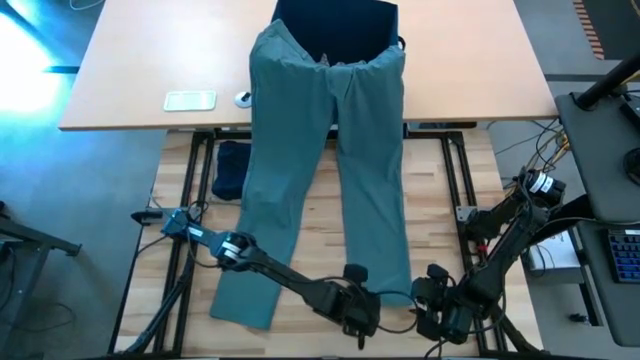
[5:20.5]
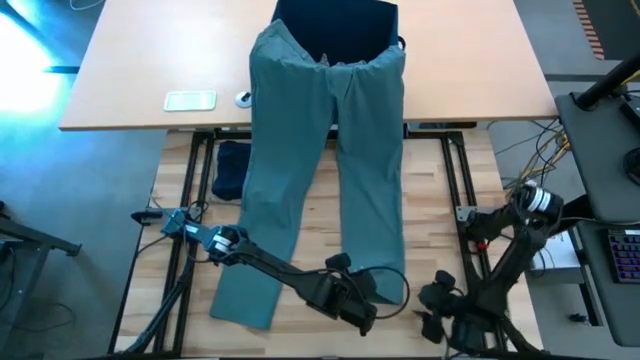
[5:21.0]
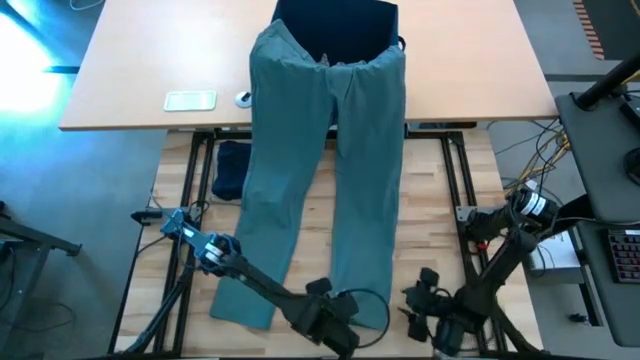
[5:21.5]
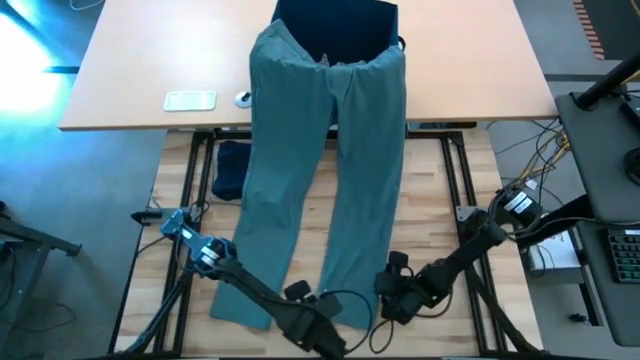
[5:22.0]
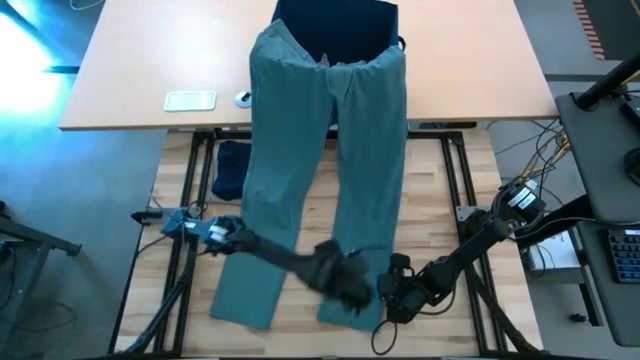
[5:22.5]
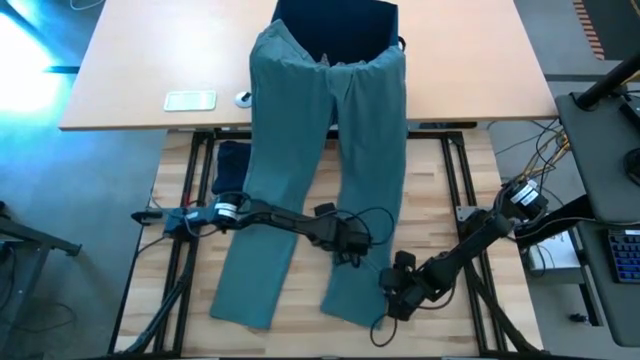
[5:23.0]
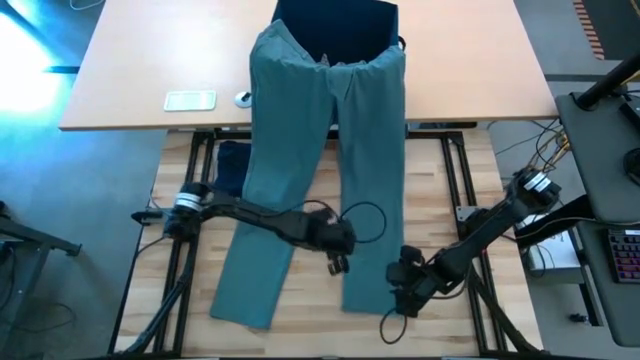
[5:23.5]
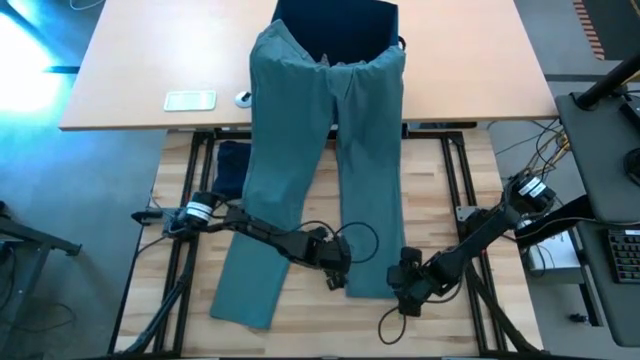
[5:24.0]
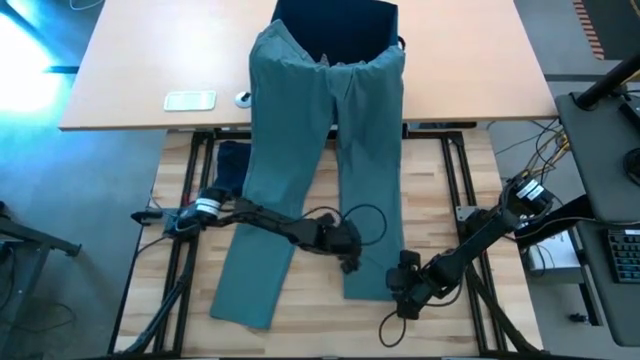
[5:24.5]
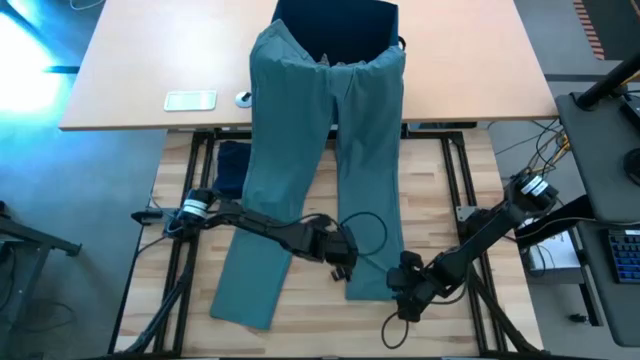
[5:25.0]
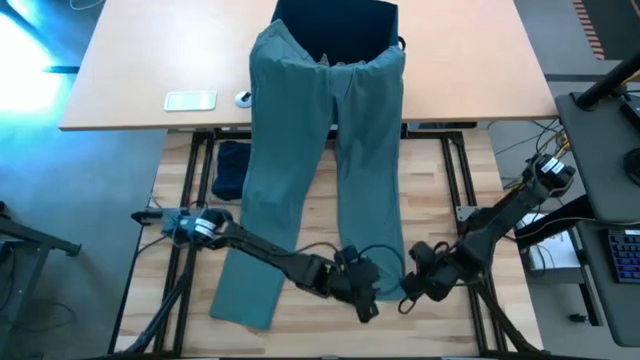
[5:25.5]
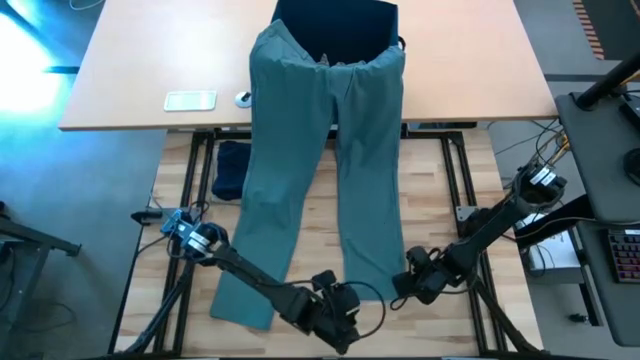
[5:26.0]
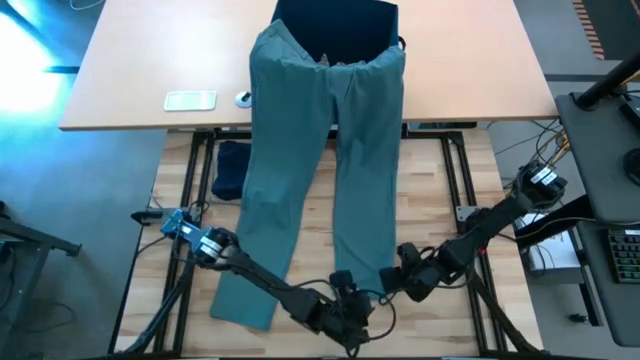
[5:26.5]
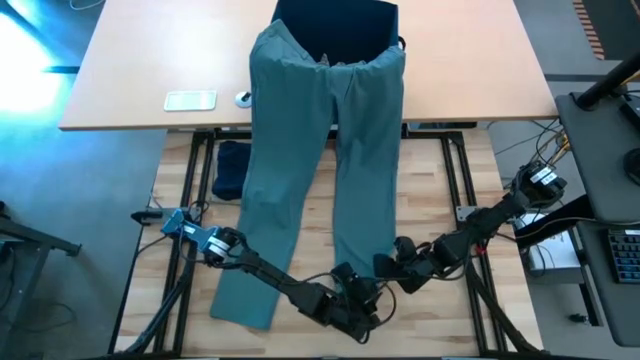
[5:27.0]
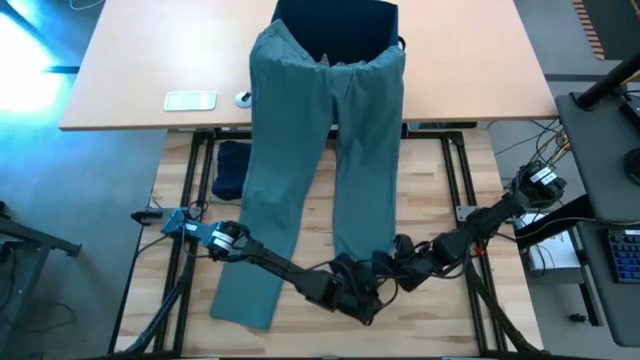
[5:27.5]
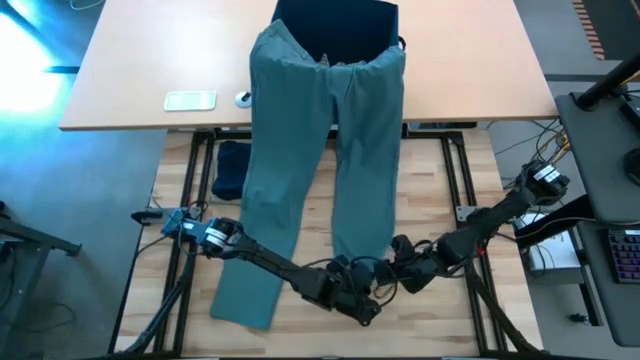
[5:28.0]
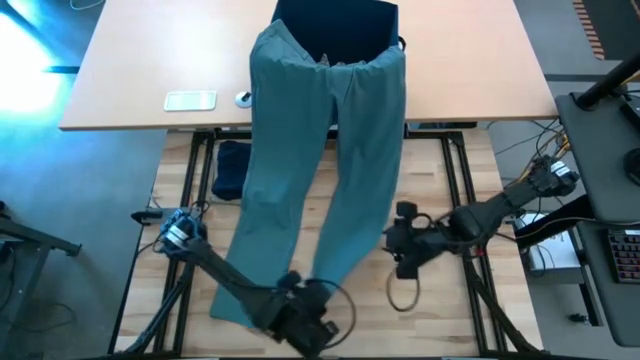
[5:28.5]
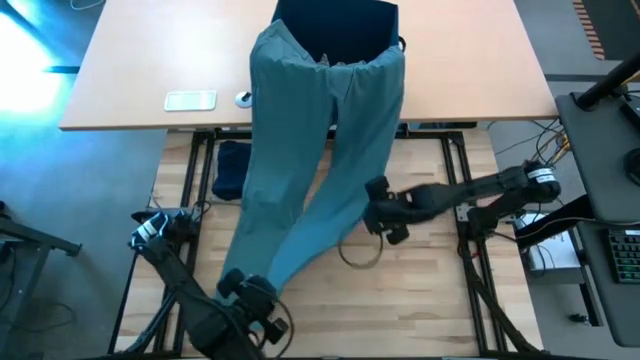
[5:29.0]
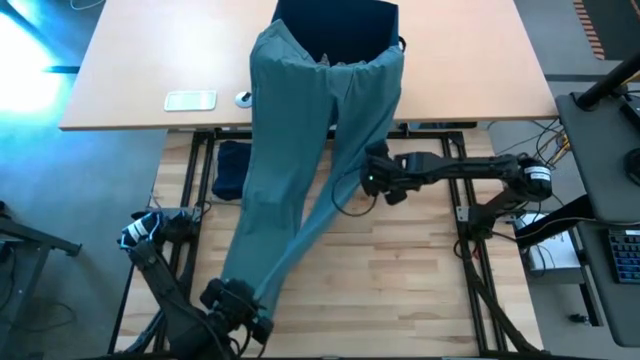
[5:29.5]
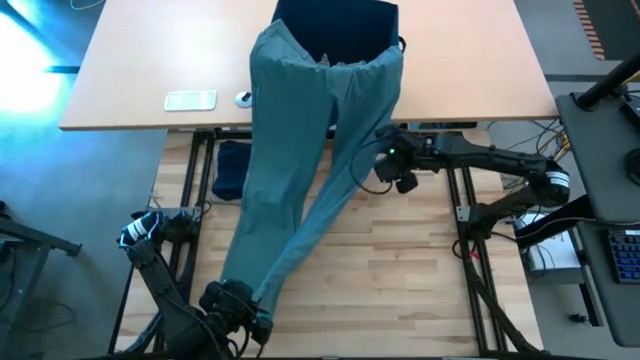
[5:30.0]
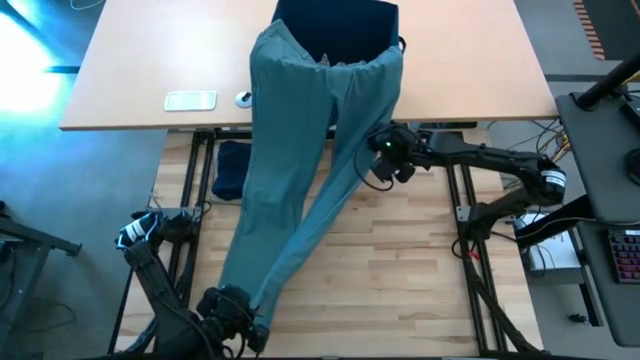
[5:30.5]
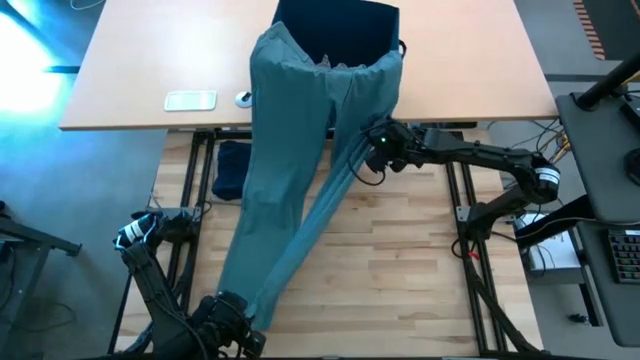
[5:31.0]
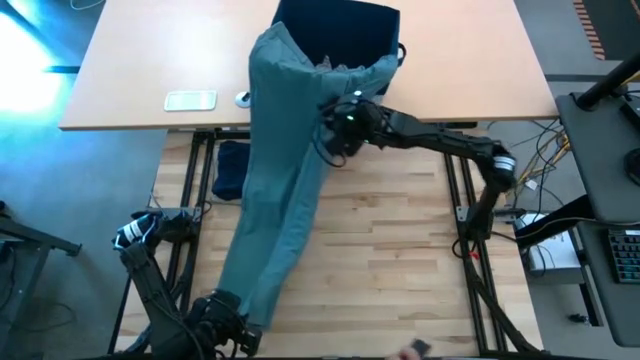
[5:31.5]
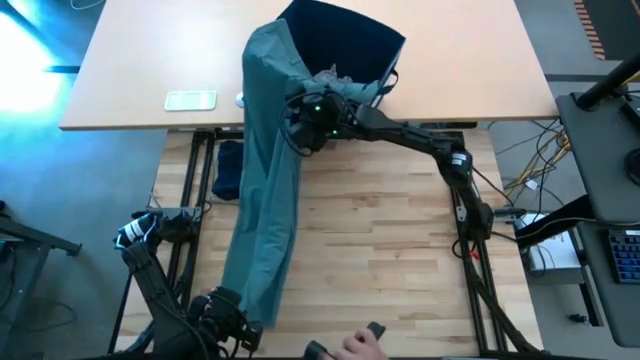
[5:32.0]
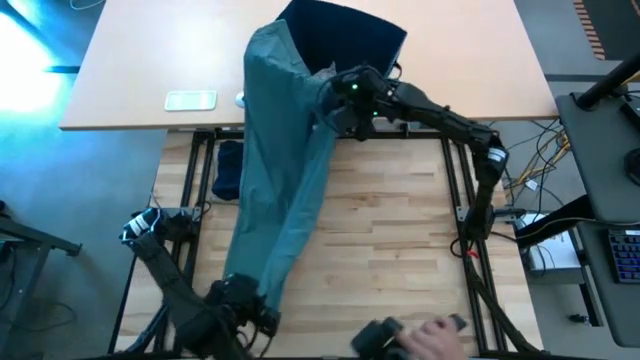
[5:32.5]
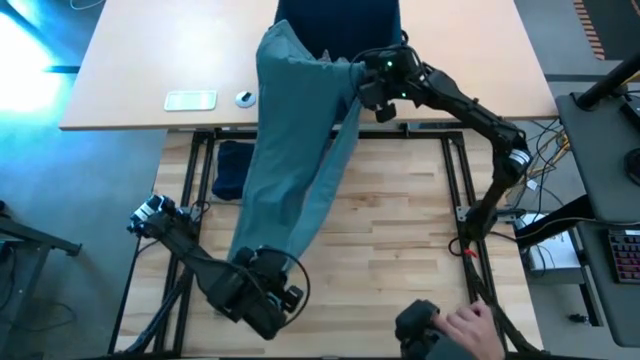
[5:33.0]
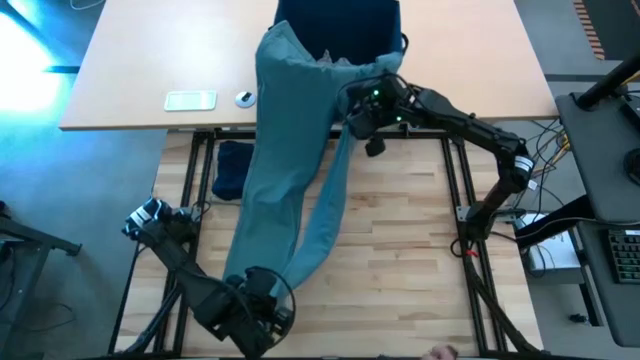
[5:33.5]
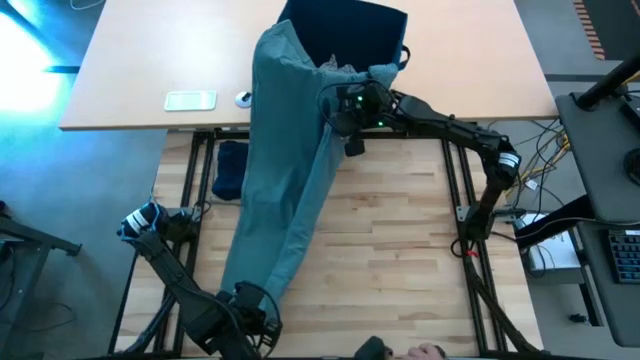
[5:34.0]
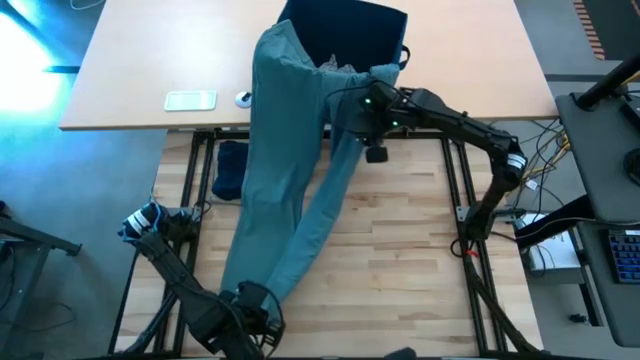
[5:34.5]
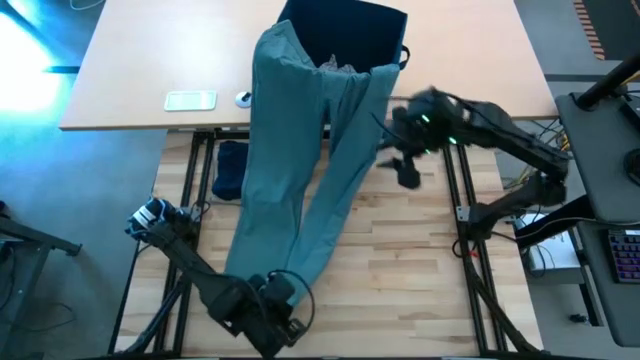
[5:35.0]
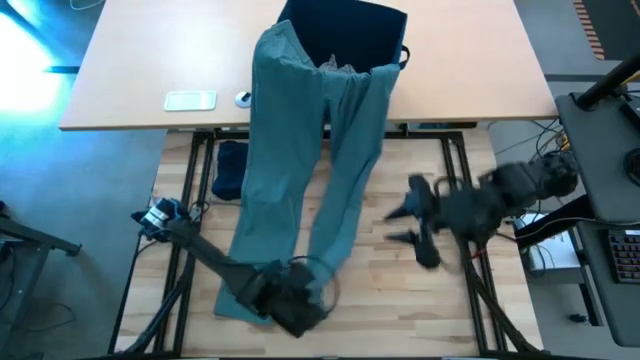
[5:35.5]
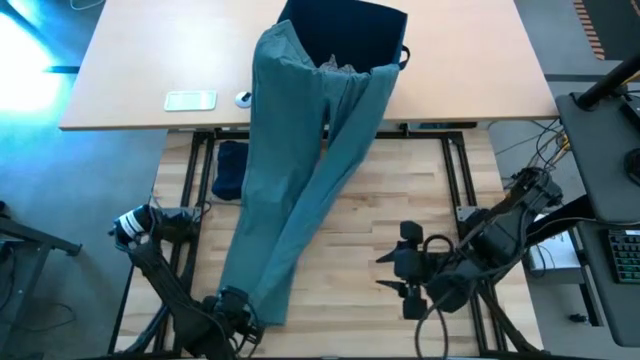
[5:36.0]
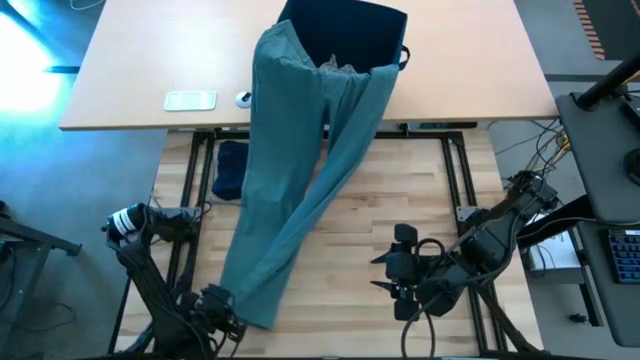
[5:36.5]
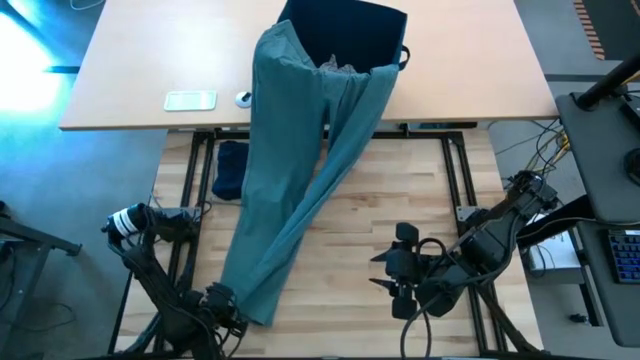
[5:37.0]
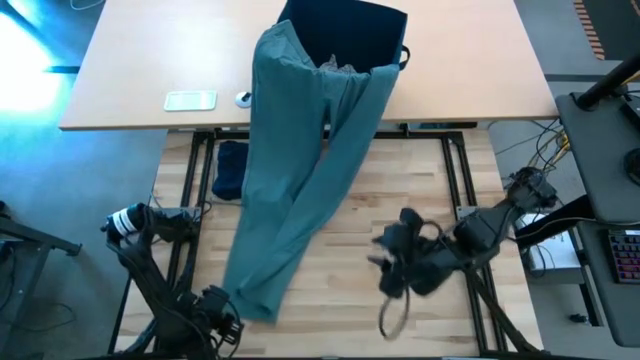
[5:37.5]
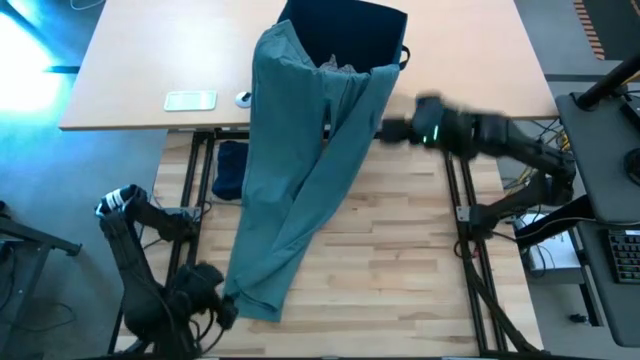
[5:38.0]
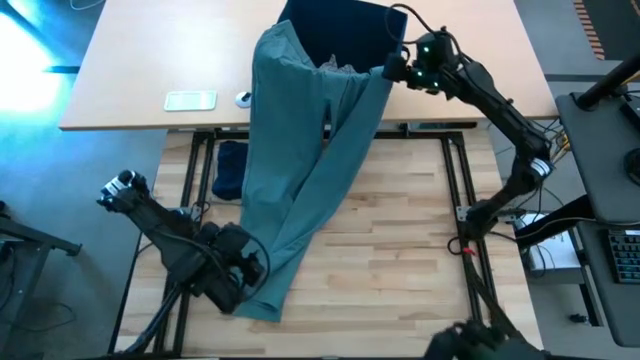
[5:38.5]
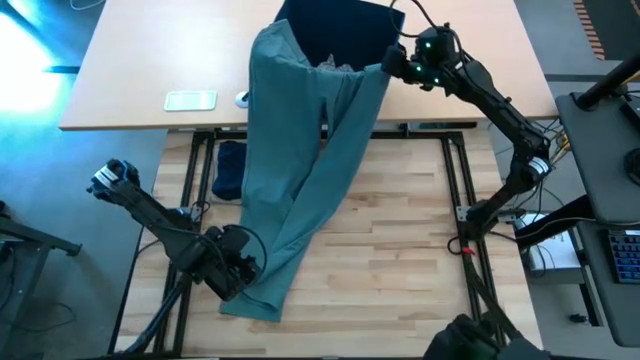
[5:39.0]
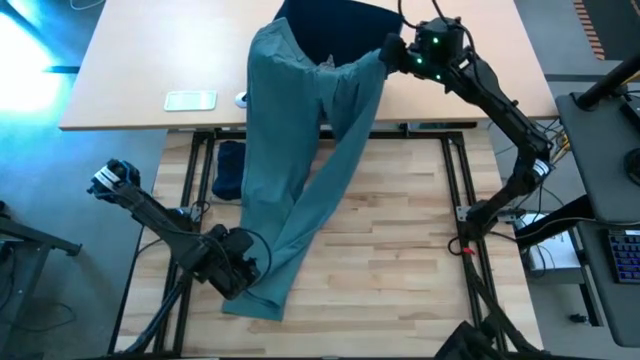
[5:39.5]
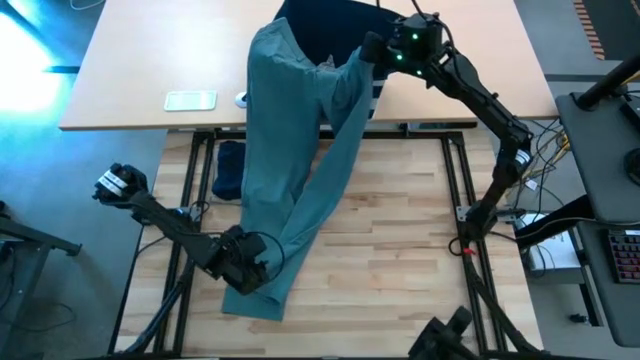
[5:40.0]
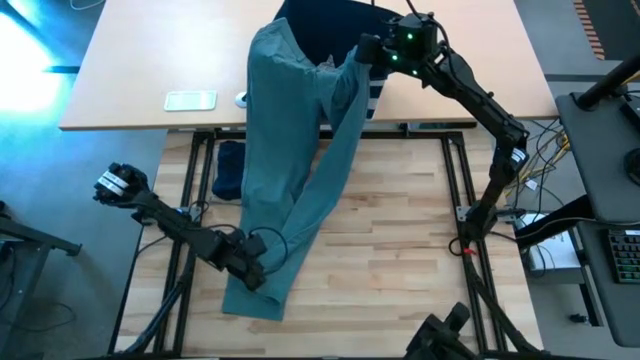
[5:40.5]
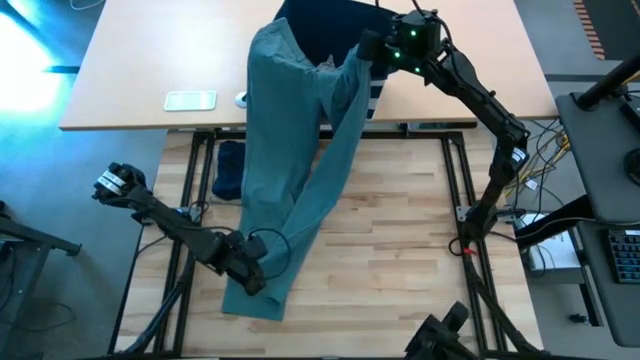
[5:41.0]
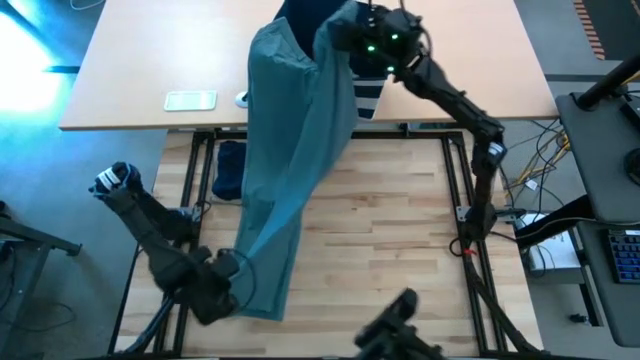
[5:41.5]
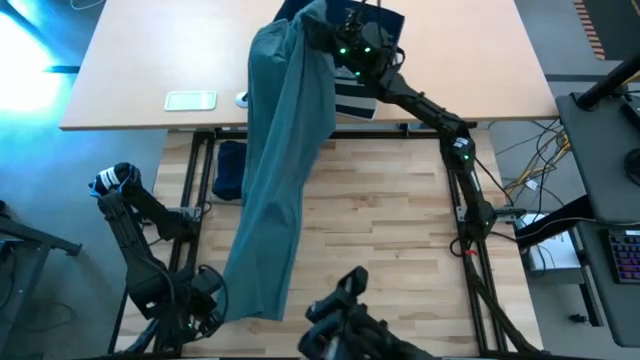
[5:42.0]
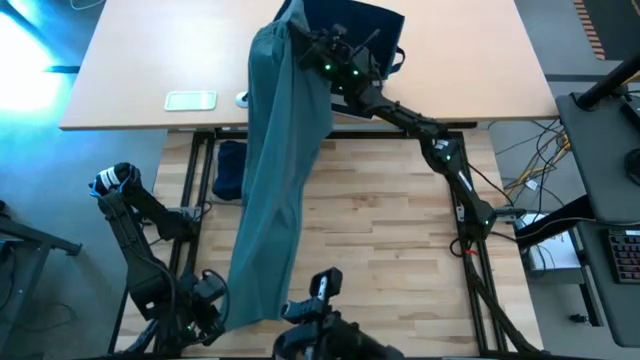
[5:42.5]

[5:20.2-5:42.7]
Task: Fold Laundry from Bin
Fold the gray pants
